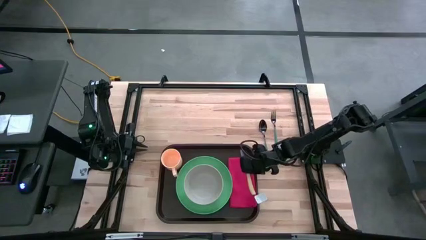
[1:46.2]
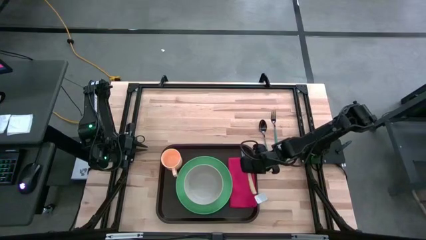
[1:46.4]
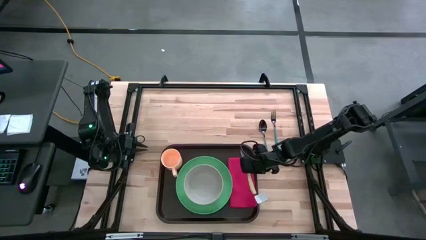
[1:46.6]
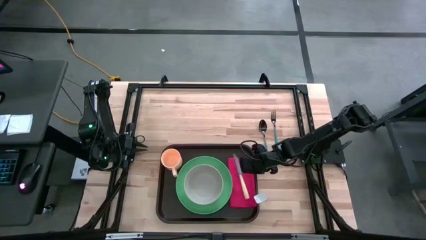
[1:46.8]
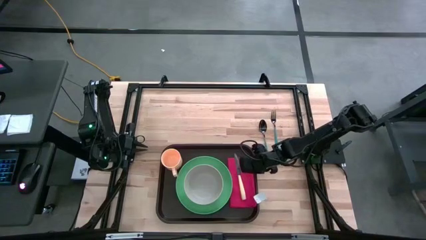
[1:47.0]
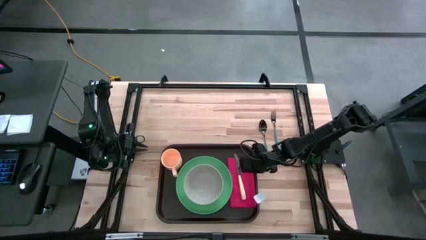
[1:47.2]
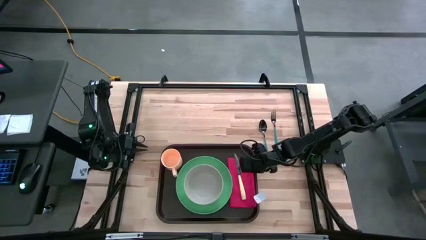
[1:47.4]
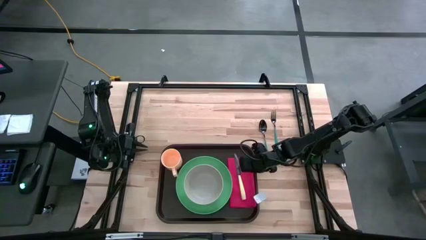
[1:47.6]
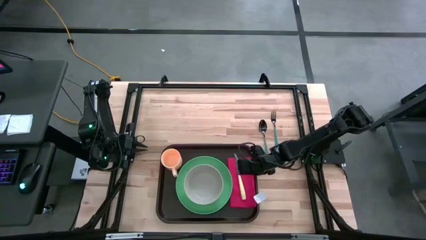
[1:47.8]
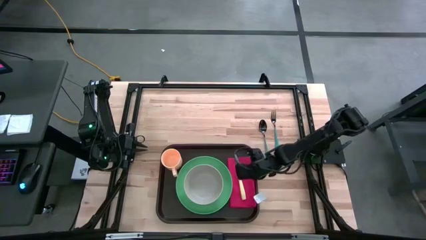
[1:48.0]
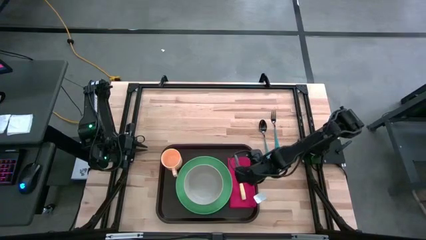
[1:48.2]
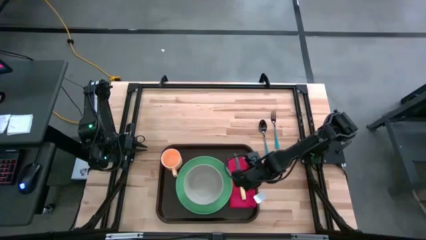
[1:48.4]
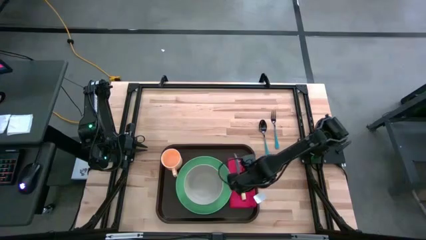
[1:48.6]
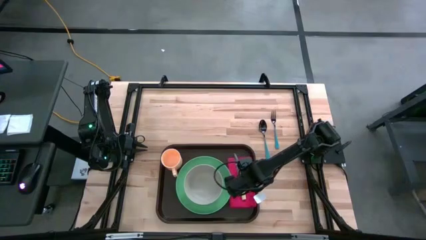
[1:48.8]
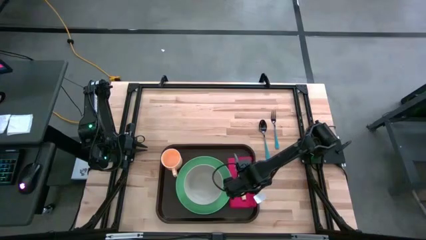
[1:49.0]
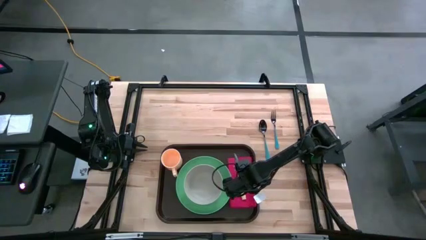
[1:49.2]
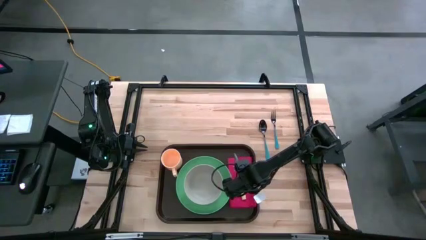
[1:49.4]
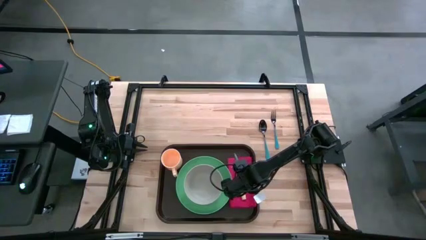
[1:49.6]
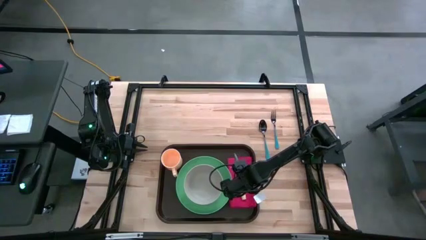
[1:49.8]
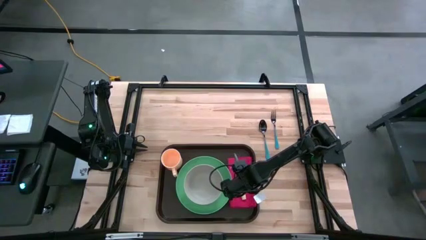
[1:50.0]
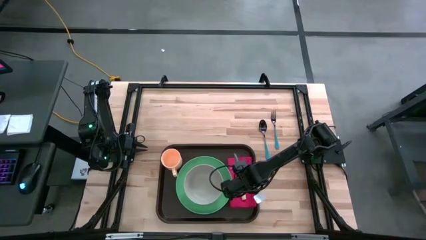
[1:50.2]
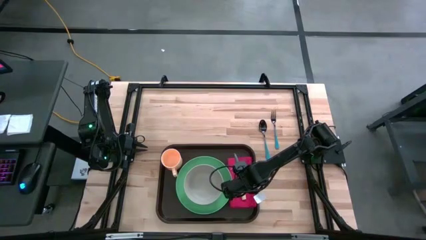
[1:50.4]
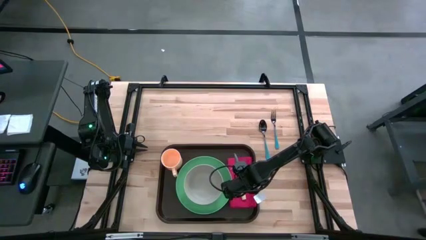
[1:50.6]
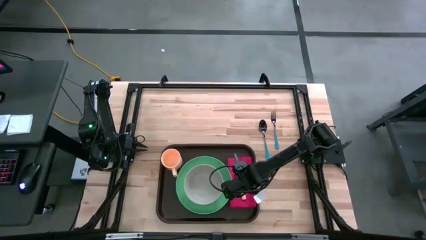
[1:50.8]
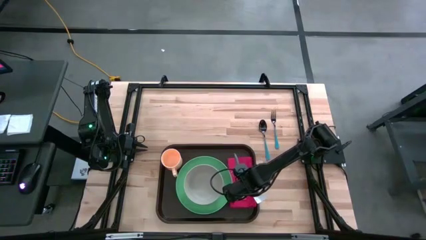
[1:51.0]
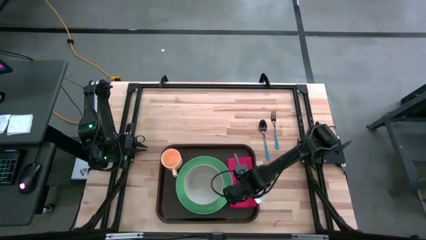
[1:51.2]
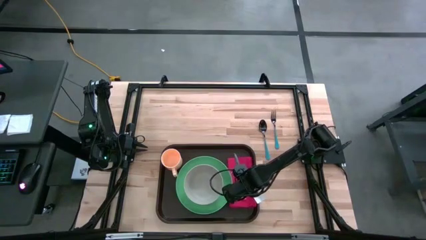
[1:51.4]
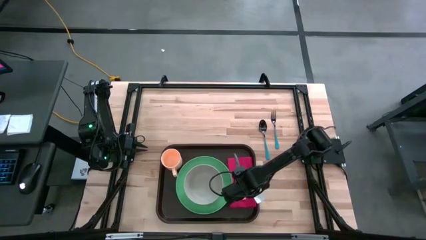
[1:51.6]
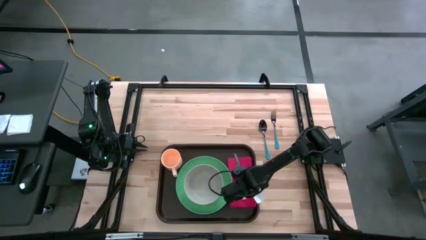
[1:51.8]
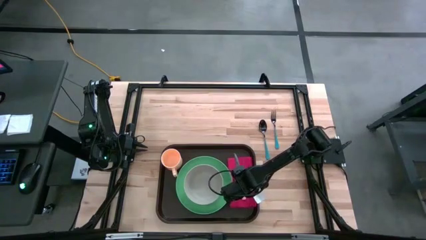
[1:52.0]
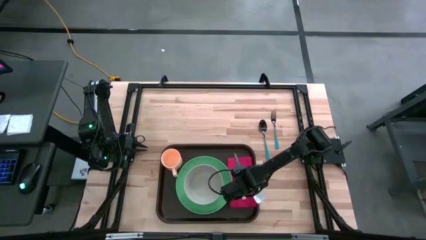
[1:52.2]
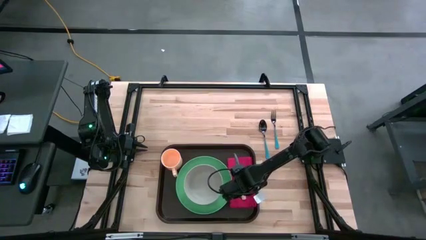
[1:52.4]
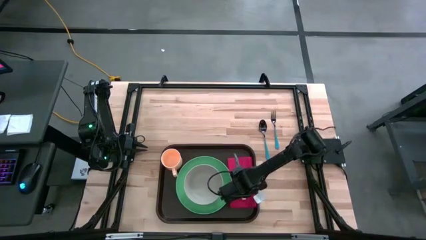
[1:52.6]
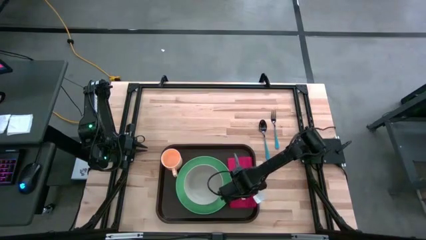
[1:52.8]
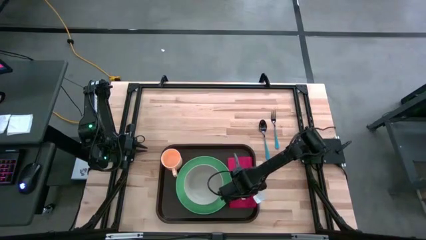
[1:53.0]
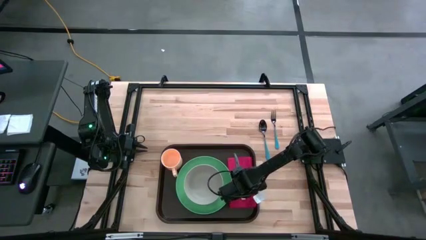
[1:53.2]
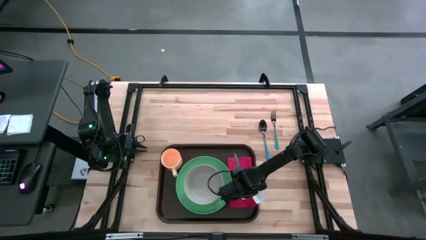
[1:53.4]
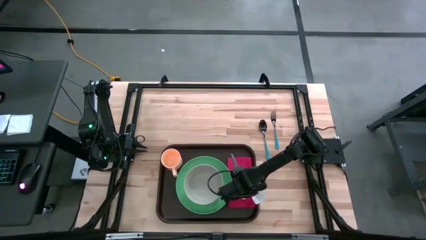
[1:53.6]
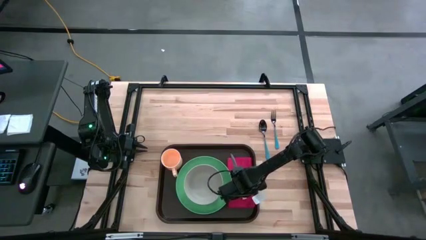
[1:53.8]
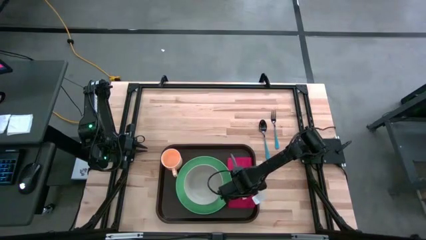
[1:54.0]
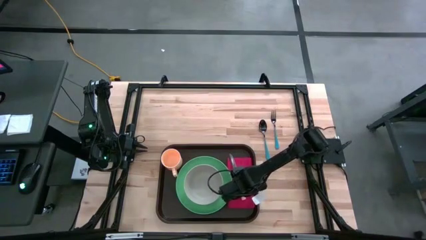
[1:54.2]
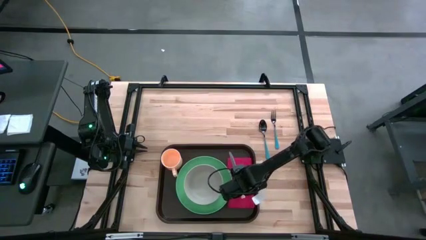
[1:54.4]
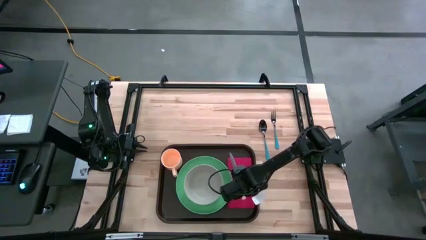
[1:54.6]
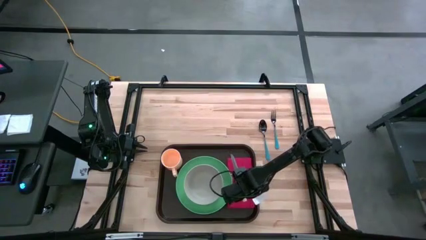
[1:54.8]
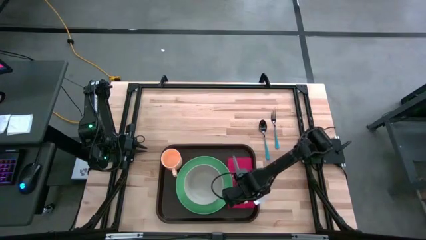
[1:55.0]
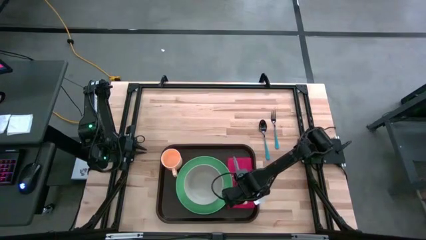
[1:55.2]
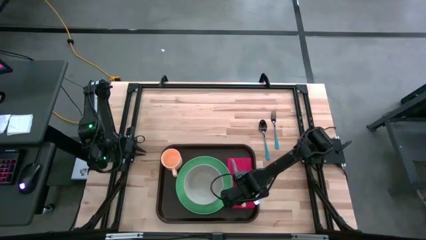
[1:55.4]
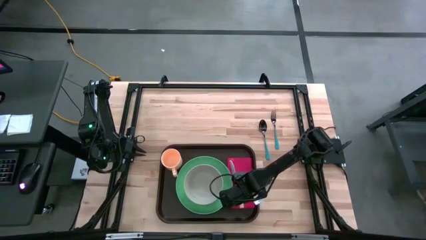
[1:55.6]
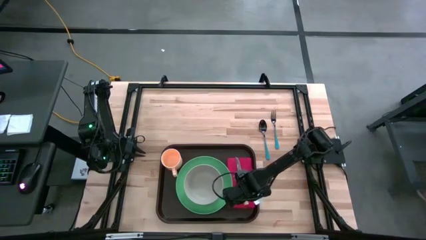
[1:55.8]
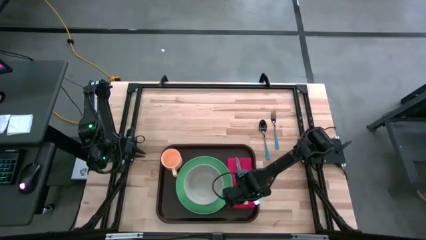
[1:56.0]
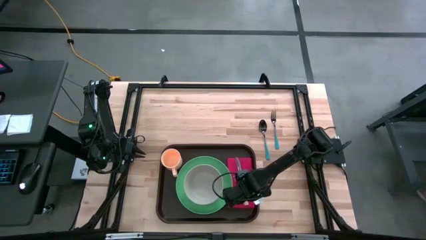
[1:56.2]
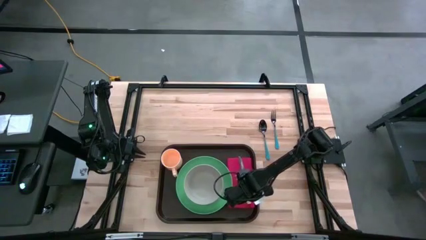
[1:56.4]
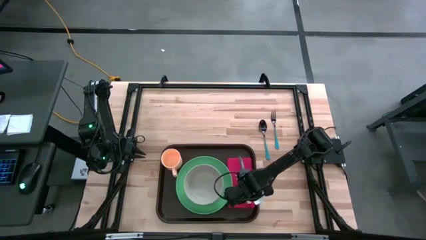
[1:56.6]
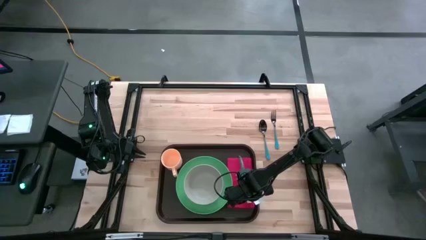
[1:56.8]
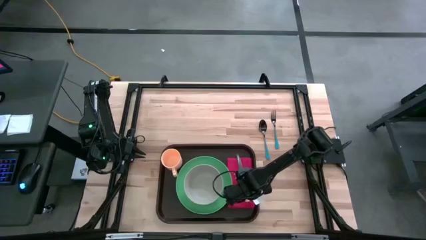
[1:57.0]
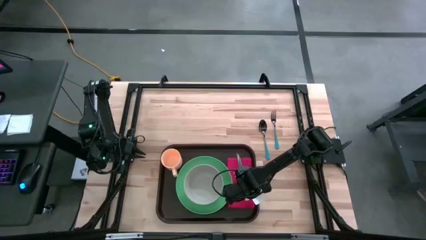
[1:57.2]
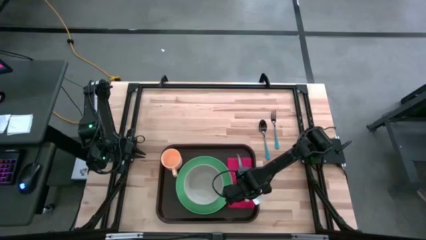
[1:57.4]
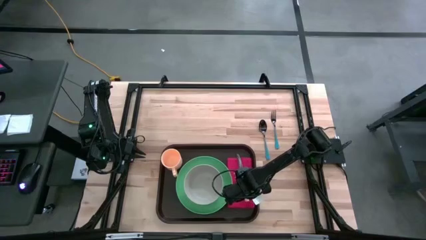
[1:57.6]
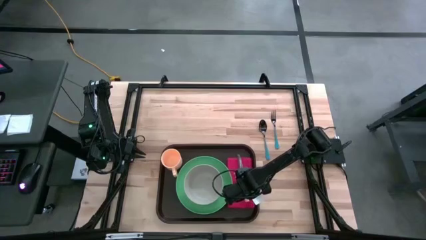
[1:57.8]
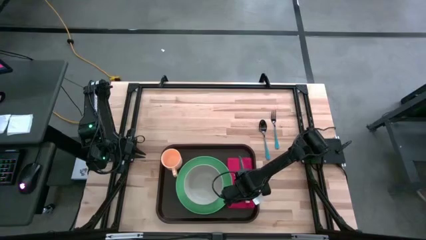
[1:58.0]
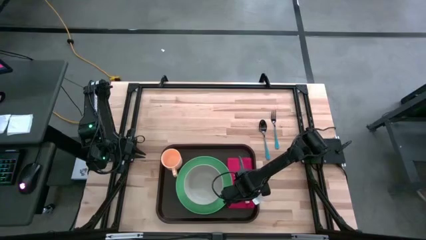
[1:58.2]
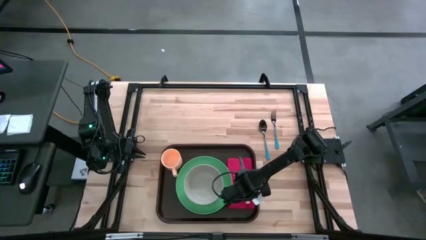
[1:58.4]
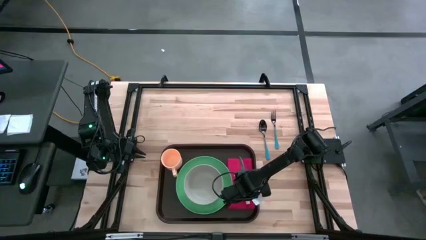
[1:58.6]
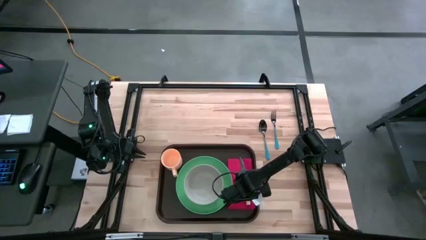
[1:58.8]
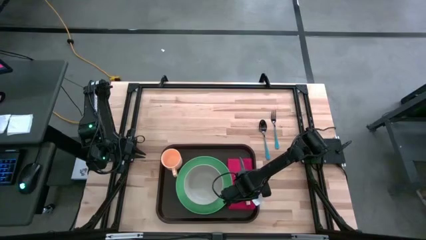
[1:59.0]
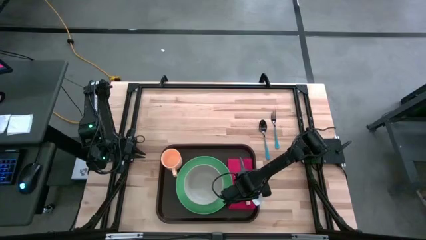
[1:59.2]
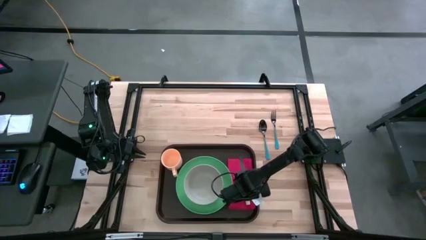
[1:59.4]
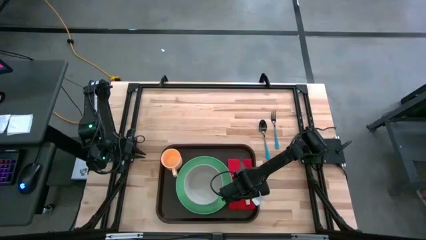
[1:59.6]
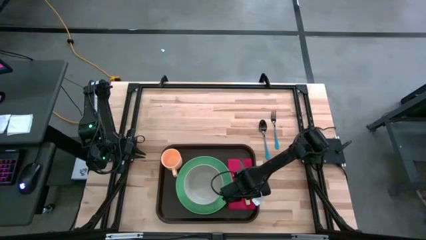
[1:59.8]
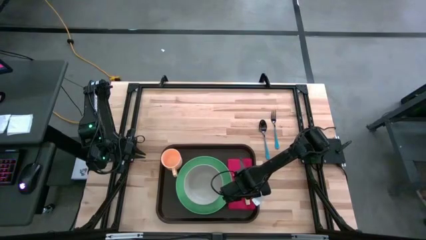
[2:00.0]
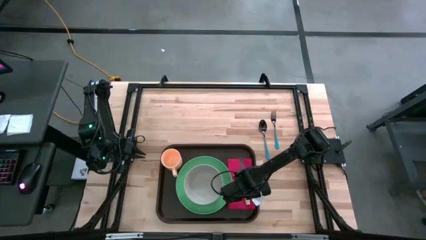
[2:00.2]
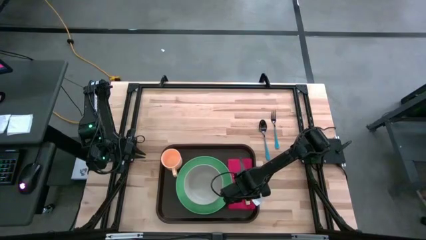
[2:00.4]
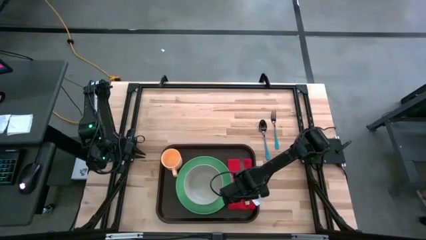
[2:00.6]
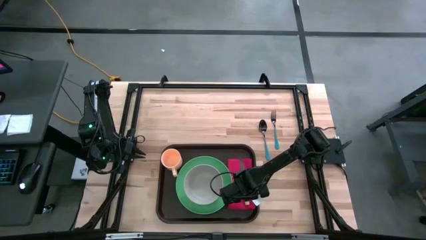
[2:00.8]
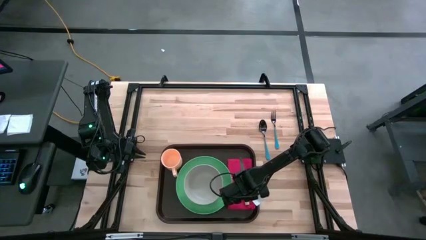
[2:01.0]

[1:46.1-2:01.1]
Task: Set up tray
Put the yellow knife on the red napkin

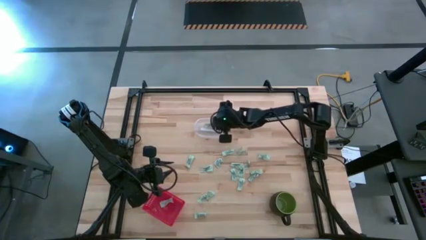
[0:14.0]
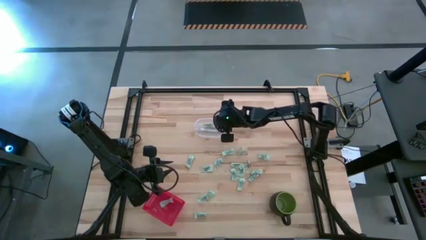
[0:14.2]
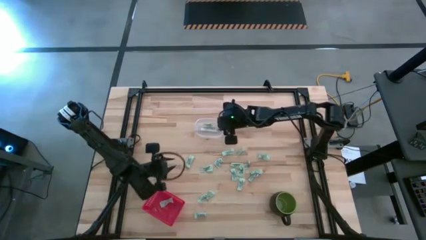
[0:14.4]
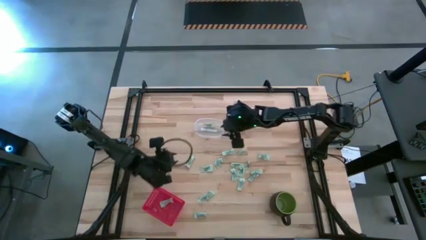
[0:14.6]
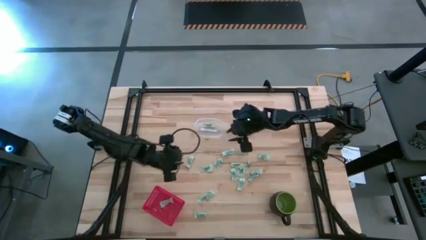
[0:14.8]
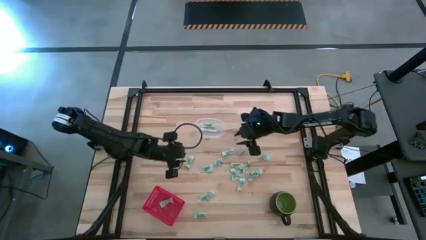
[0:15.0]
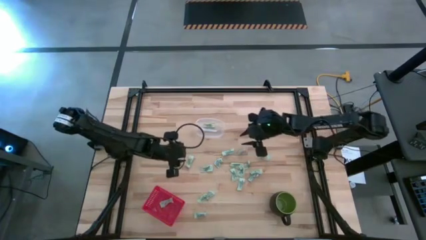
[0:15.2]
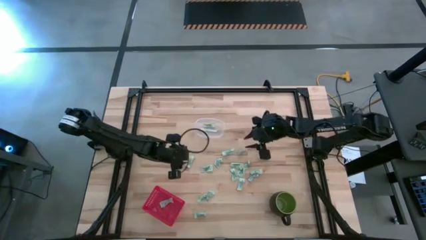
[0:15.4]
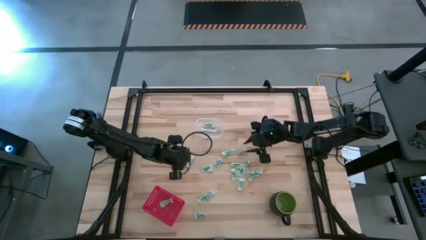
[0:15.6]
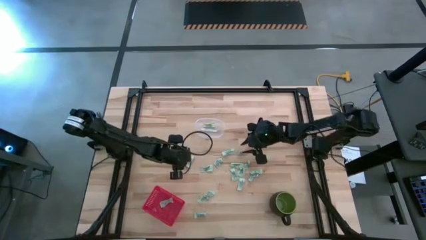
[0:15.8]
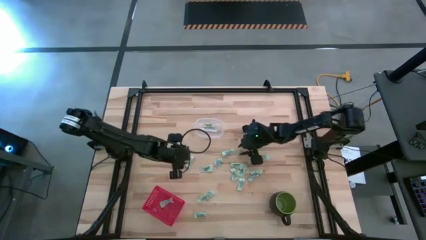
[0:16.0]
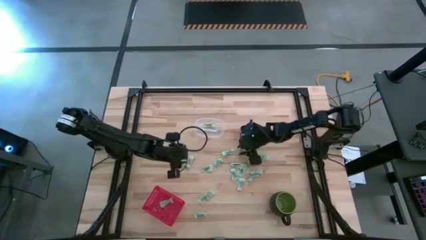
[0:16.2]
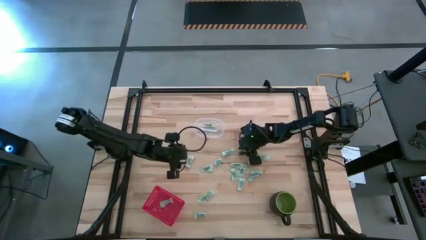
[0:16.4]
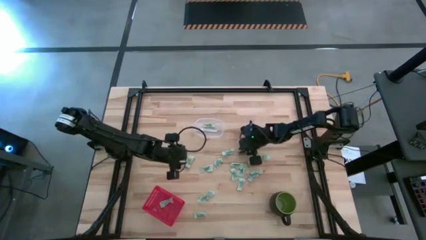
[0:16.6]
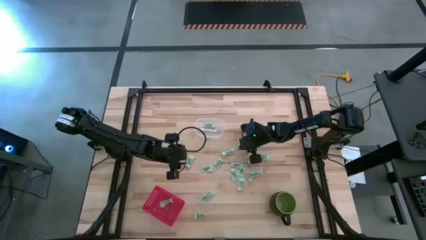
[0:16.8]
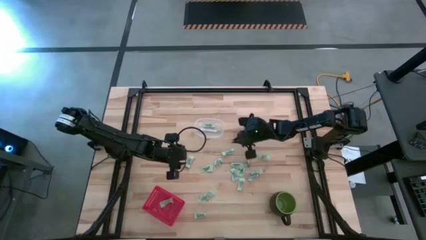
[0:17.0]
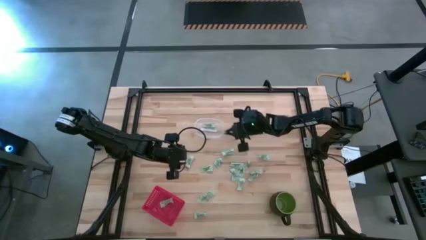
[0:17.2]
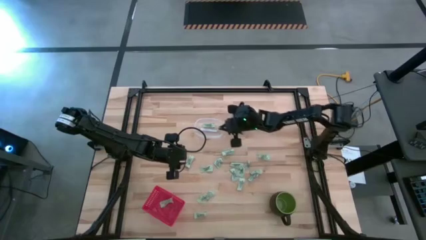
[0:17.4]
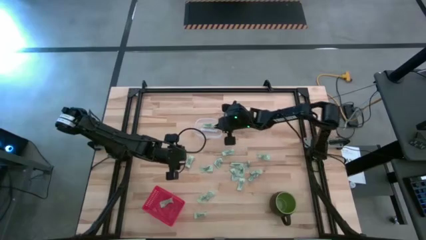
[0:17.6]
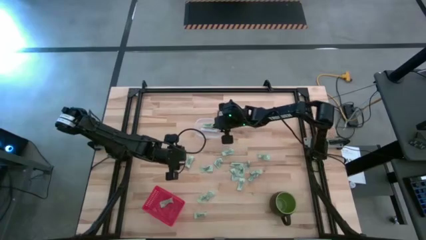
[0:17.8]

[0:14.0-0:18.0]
Task: Pick and place items into bin
Put the stevia packet into the transparent bin
